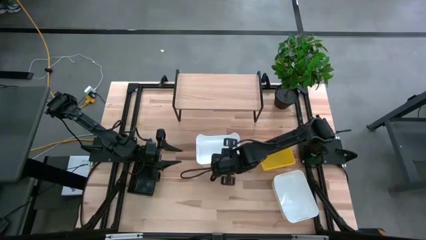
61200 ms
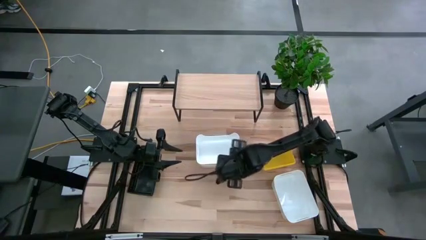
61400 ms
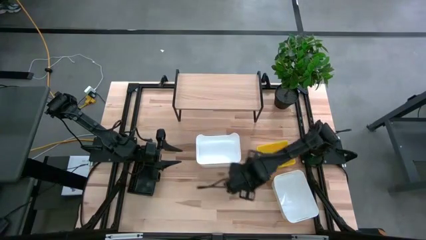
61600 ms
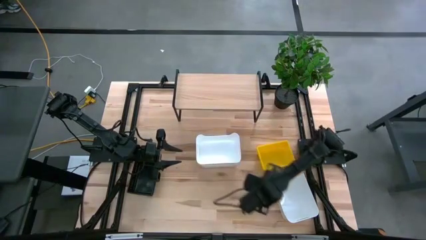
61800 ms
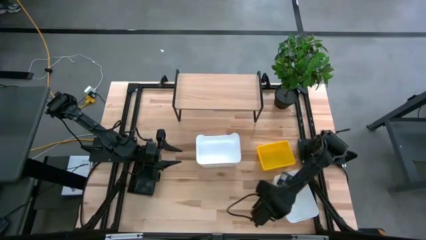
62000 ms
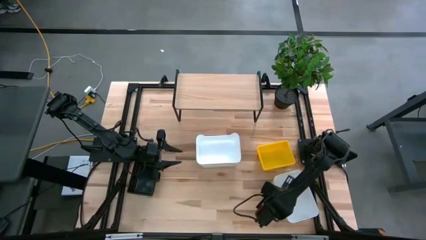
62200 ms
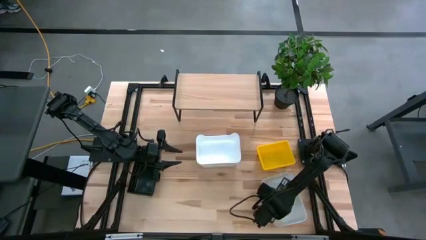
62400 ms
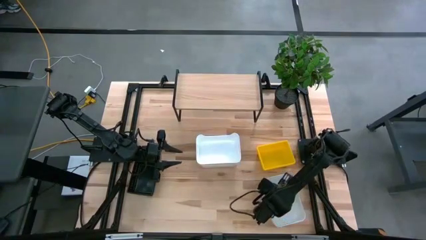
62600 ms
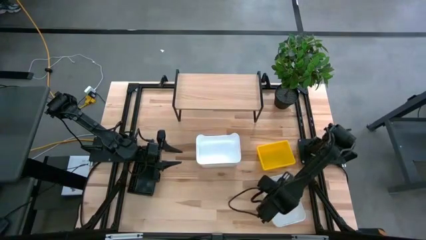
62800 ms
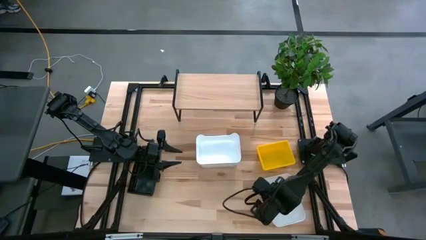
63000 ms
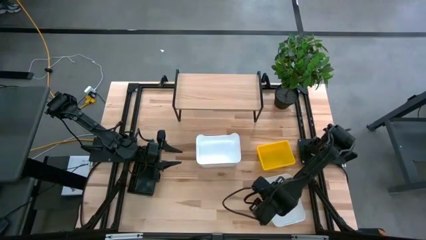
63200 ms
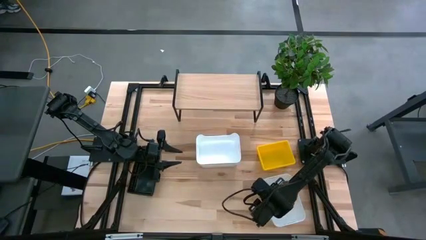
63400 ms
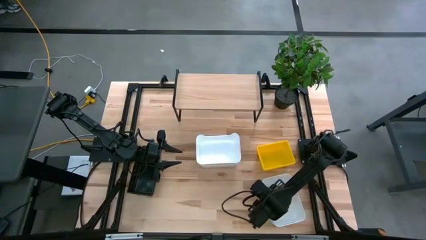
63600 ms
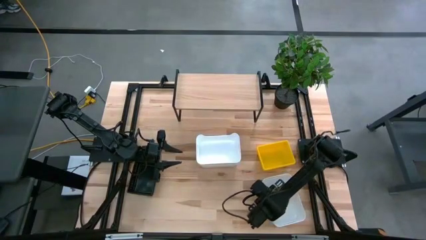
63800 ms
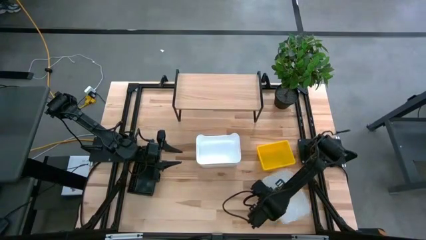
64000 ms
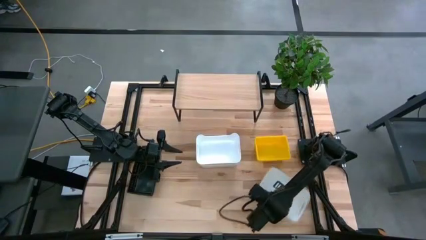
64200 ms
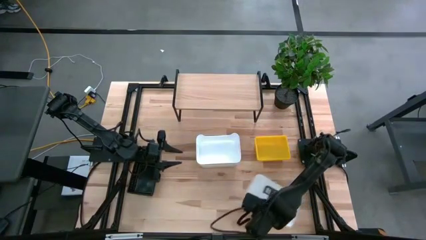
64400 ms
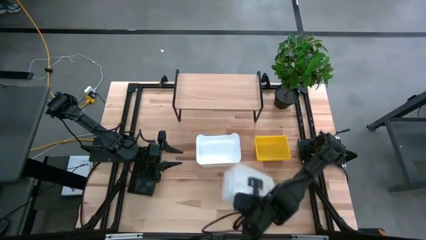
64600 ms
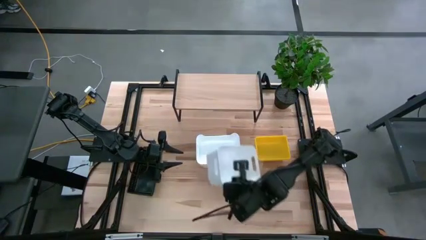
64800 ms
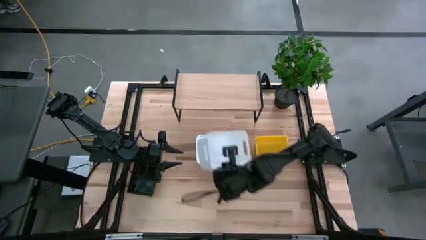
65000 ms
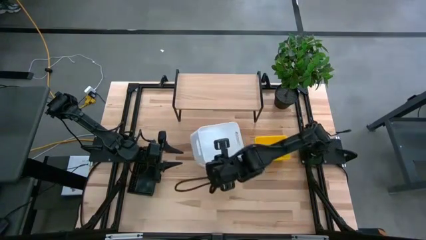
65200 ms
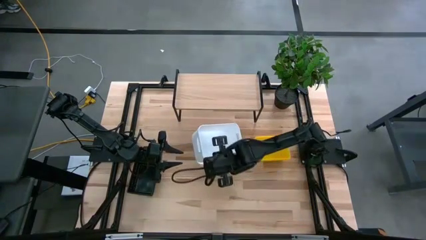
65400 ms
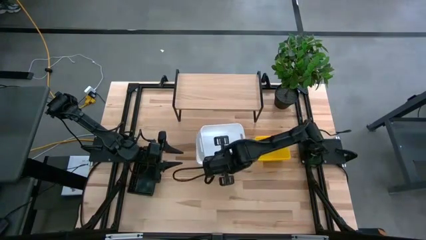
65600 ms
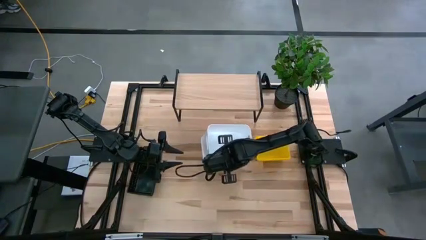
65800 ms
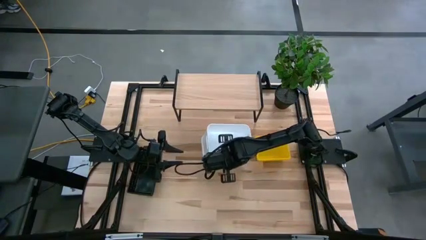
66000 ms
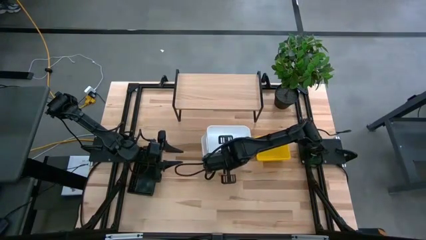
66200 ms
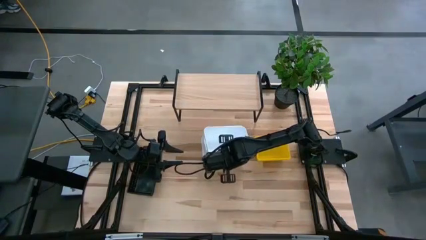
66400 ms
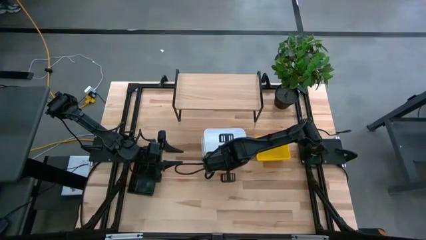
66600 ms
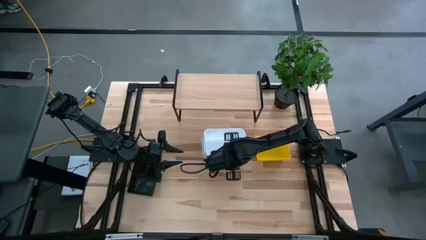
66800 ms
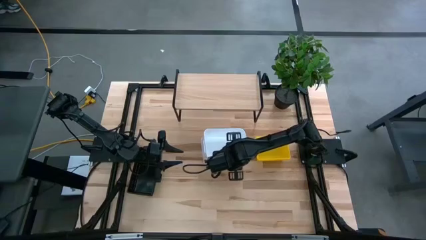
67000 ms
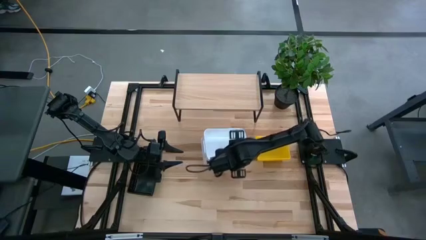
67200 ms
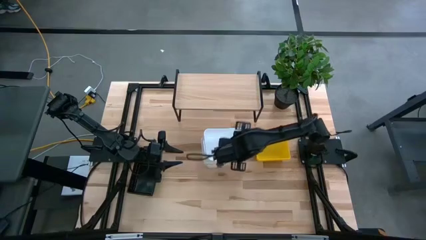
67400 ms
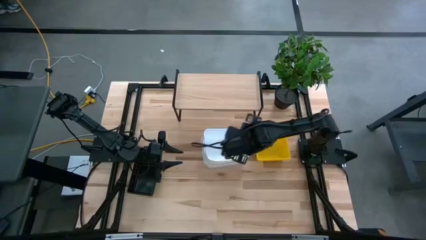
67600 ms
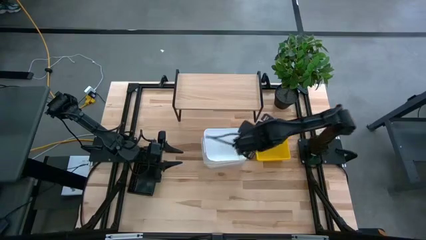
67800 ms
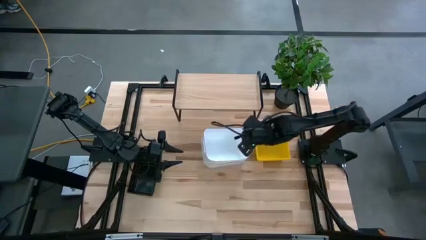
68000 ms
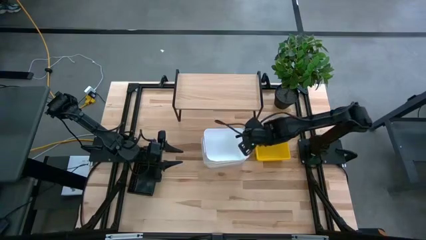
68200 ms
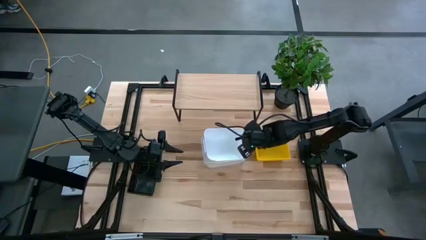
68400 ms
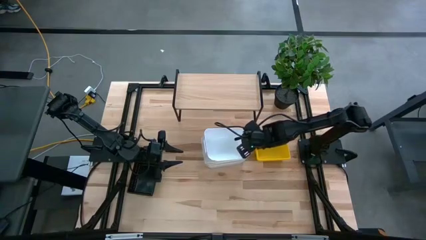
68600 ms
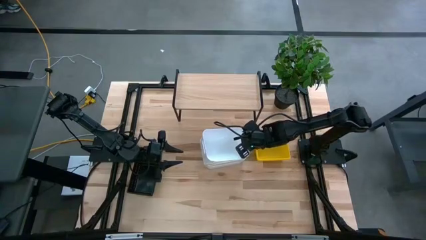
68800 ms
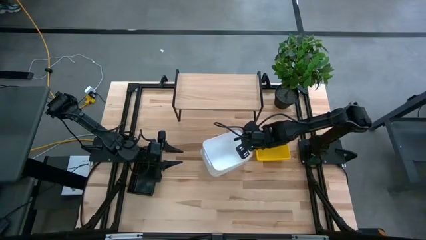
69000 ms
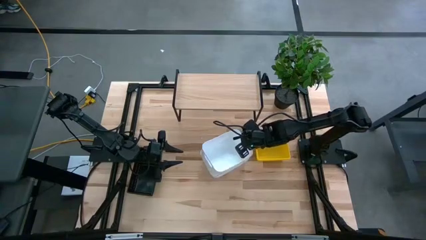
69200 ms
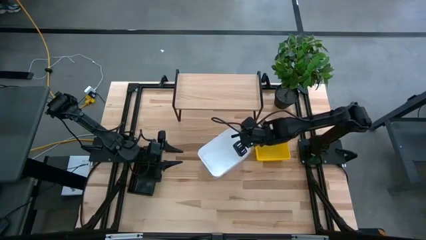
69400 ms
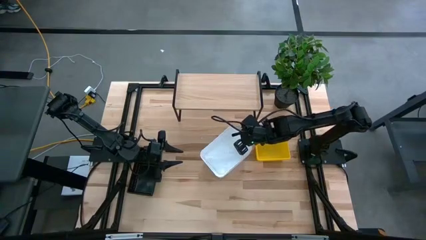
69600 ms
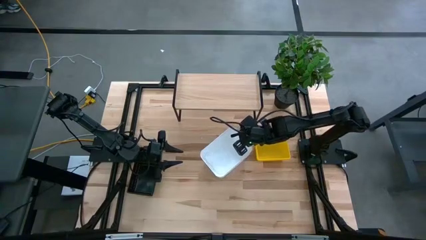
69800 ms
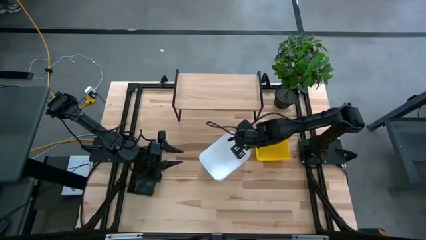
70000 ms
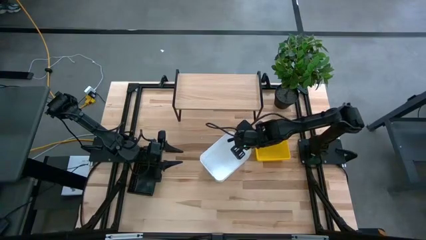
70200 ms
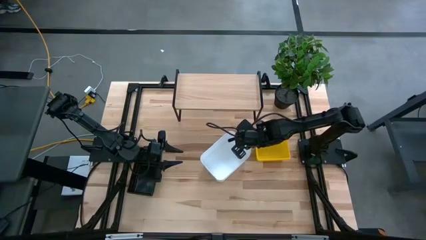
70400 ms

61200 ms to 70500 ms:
Task: Stack baskets on shelf by color
Stack the white bin on top of the stacked white bins

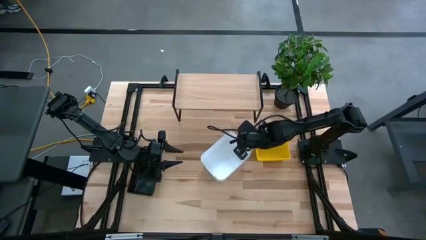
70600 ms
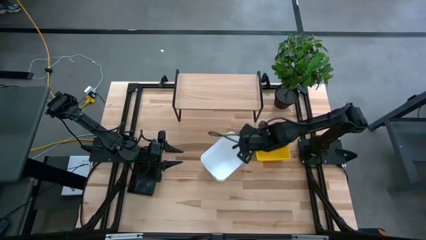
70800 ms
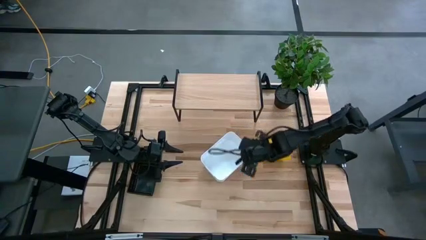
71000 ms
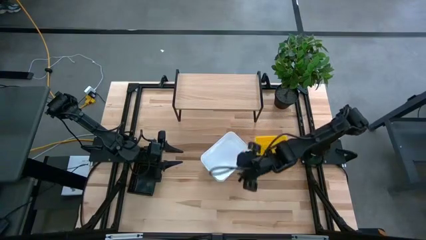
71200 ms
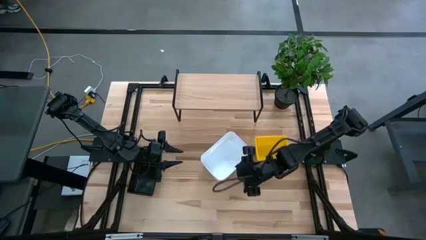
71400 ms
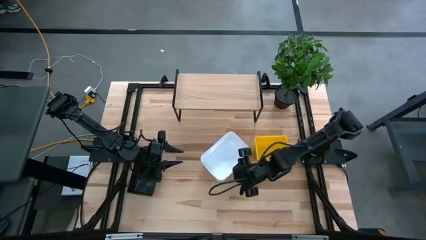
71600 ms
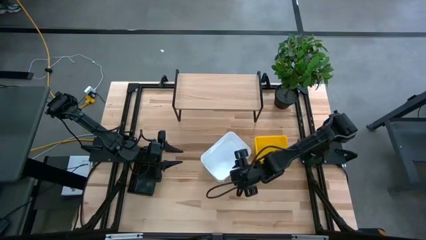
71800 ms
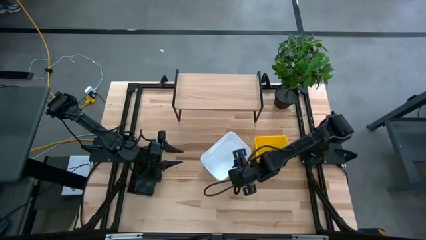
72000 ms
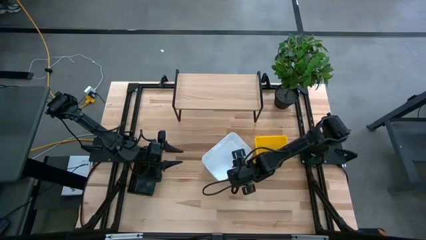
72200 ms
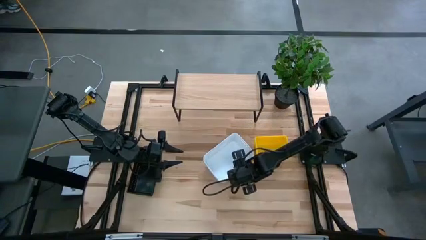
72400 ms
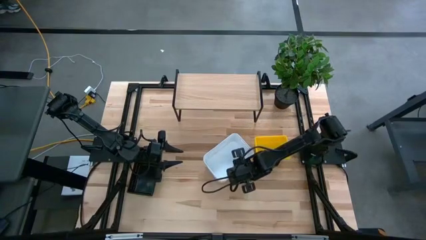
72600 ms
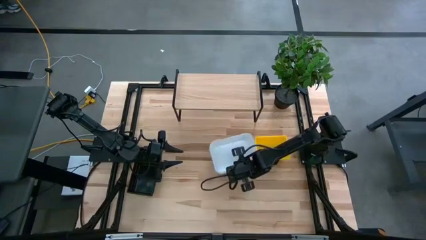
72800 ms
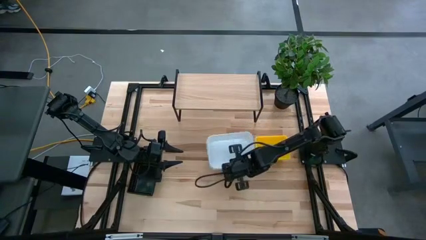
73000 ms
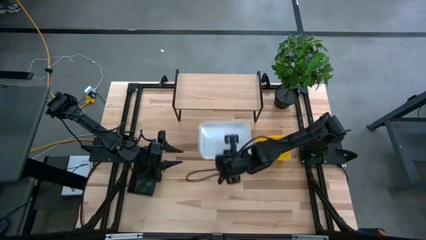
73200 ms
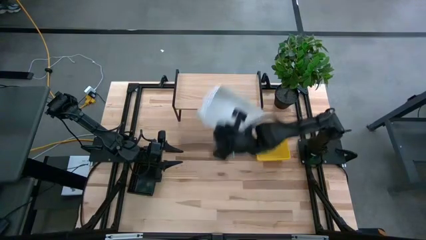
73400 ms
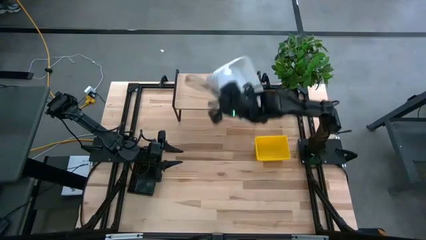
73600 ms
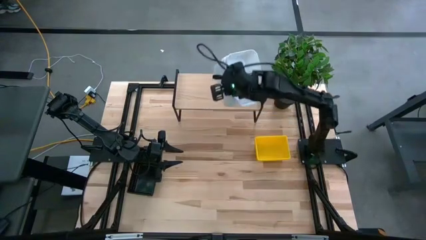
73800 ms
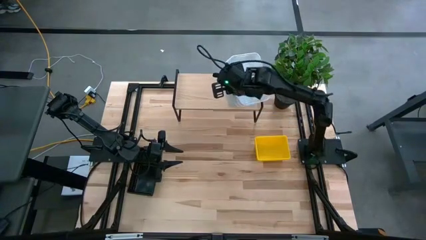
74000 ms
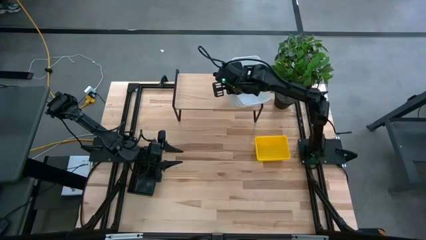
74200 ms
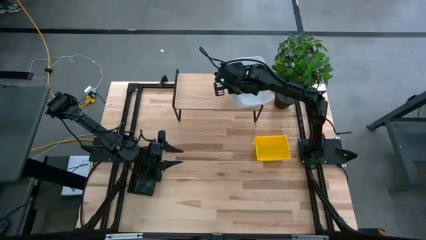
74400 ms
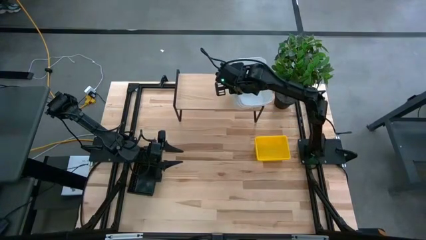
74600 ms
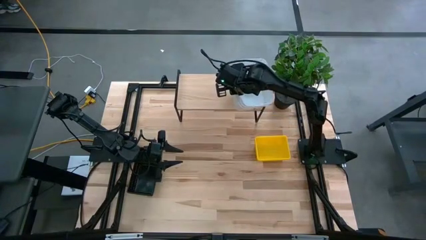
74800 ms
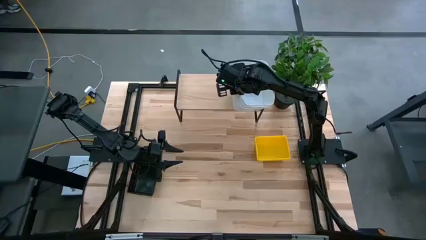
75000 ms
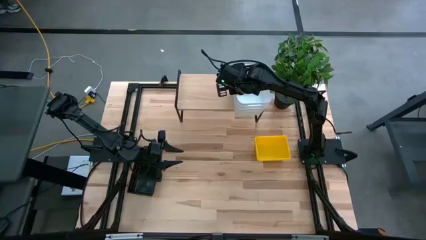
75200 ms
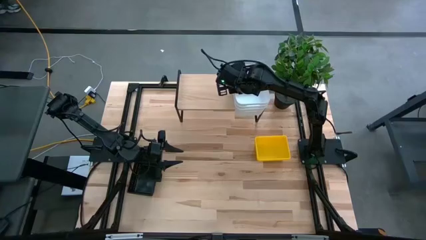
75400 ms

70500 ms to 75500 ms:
Put the stacked white bins on the shelf

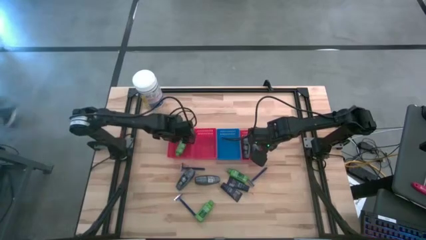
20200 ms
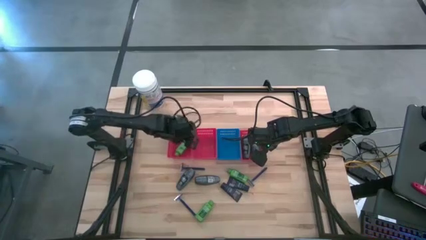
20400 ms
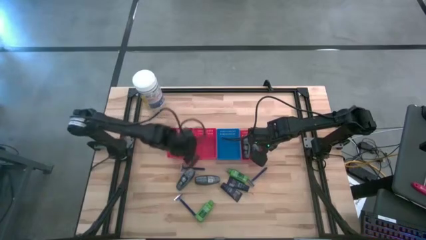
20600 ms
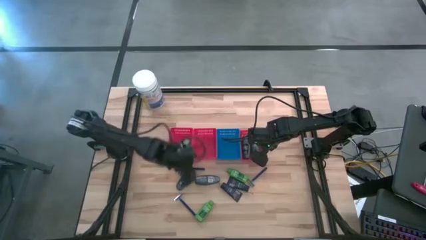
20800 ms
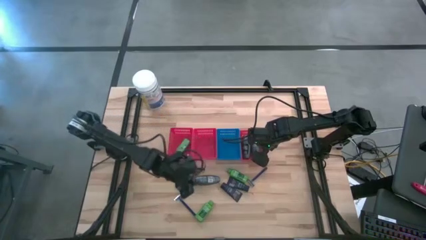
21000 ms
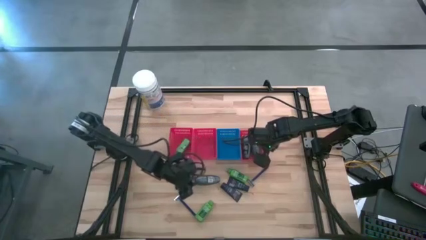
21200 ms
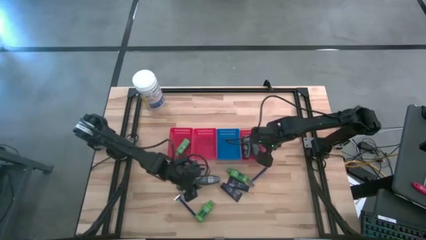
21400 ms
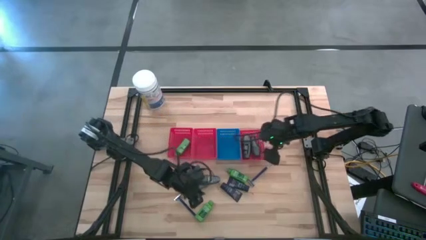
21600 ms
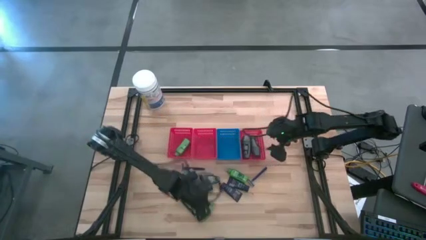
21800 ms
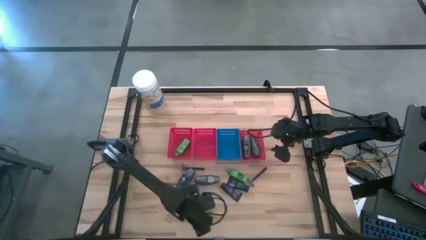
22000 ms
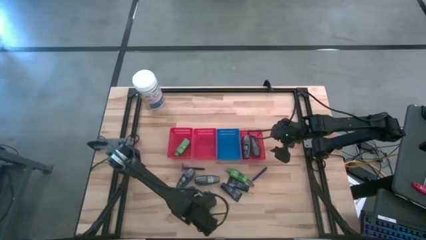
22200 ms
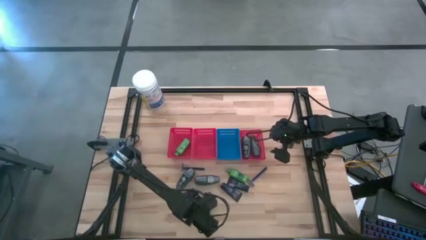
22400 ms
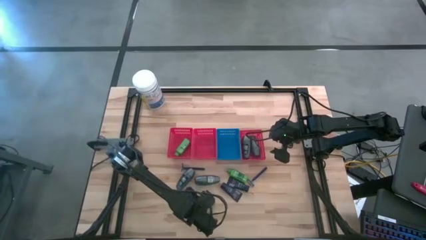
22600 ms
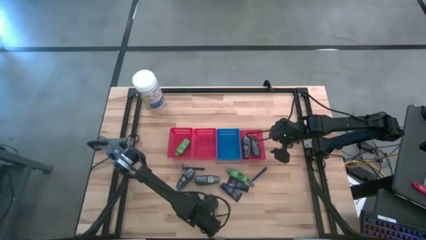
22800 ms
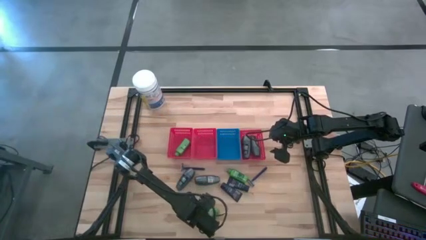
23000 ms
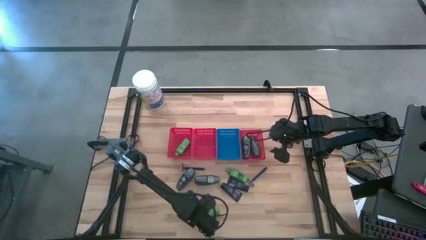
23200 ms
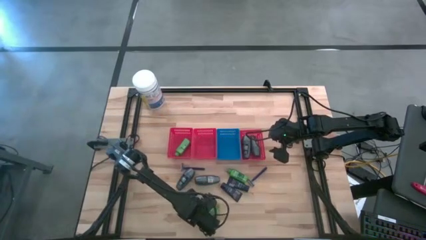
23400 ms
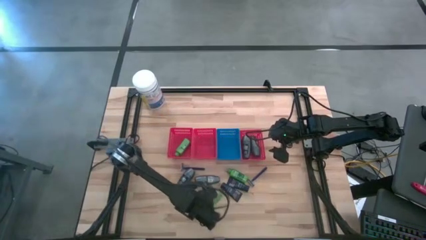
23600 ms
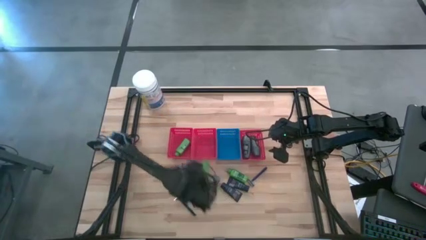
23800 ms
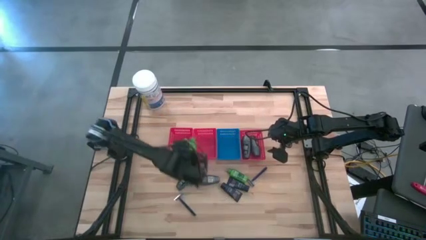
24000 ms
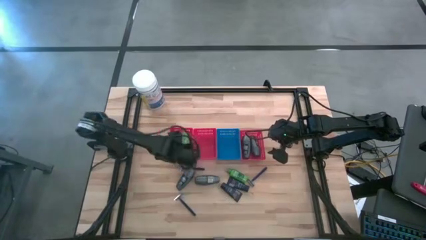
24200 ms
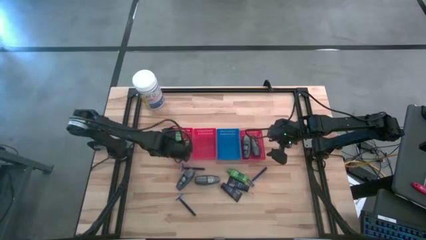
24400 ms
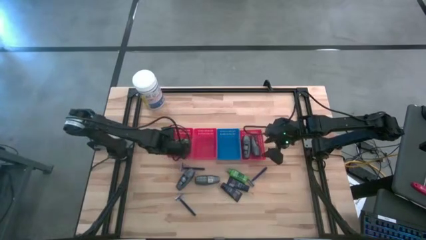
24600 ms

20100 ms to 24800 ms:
Task: Pick & Place Travel size toiletries
Put the green shampoo into the left red bin
